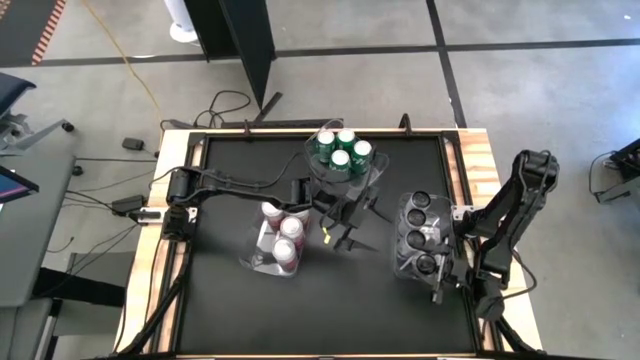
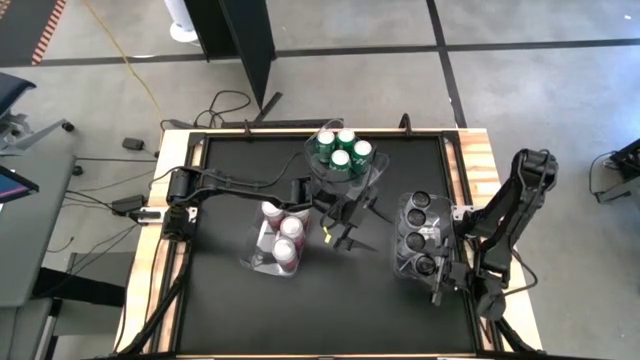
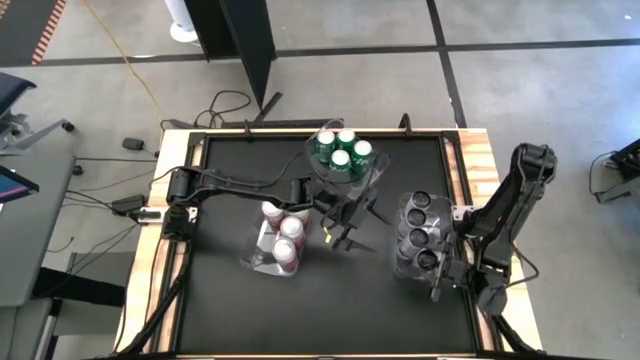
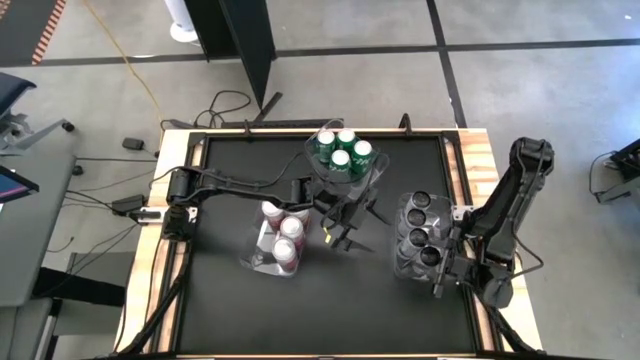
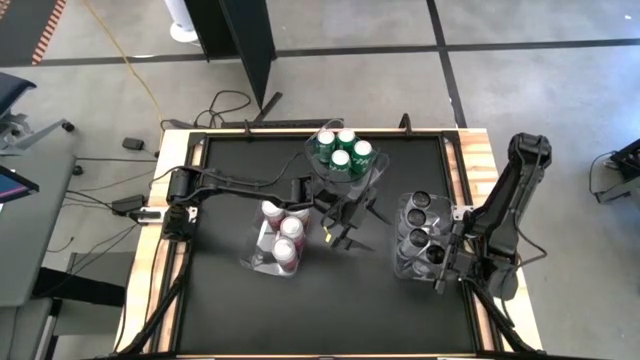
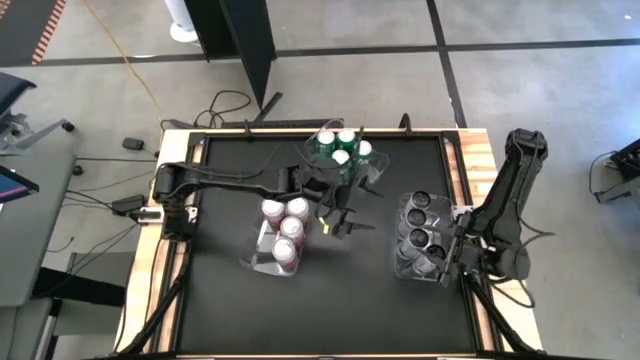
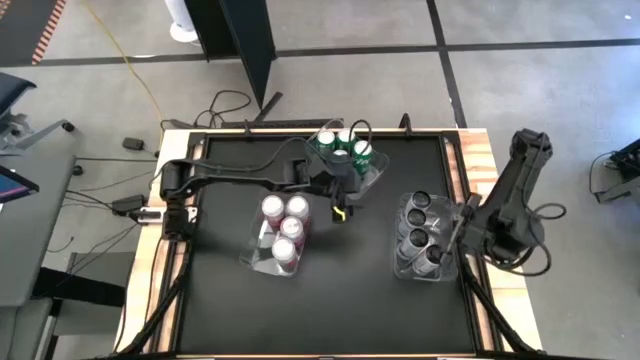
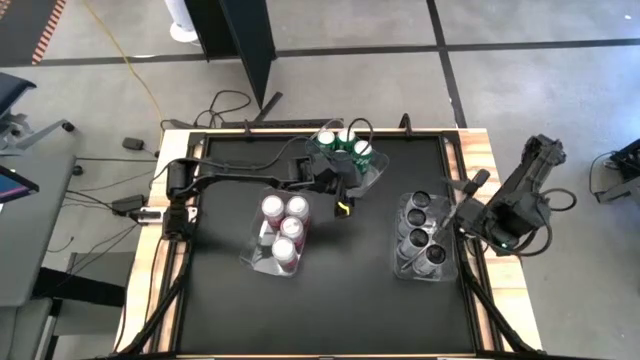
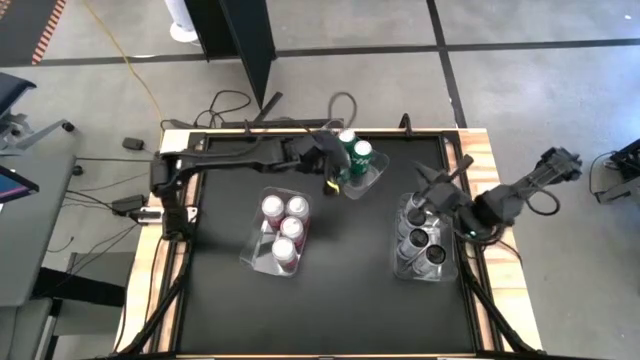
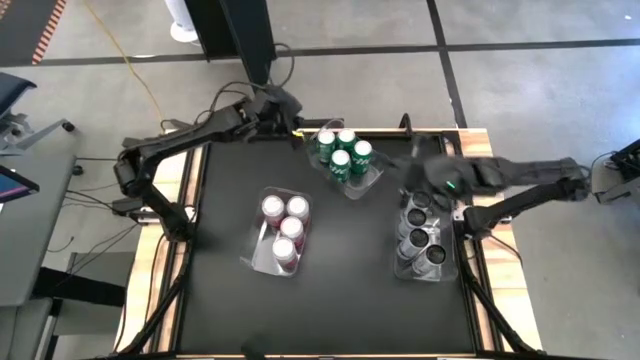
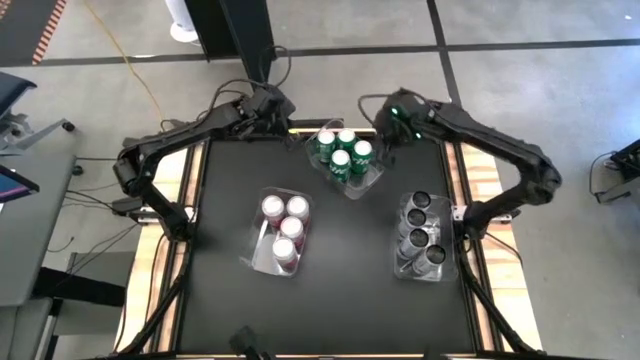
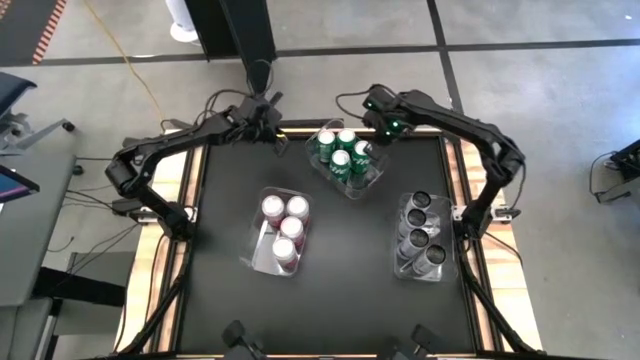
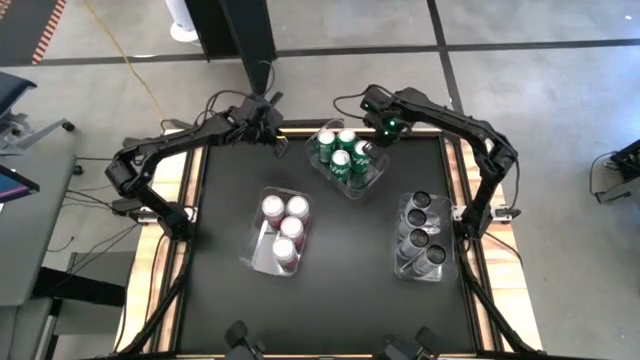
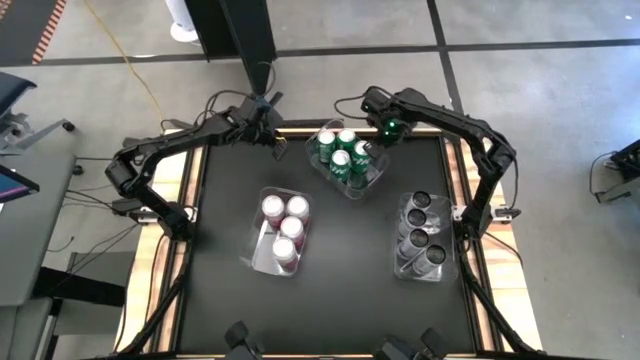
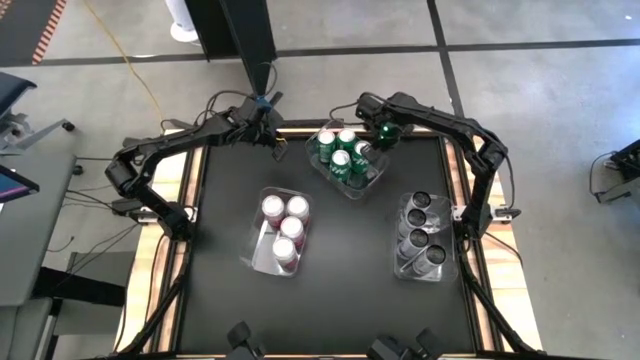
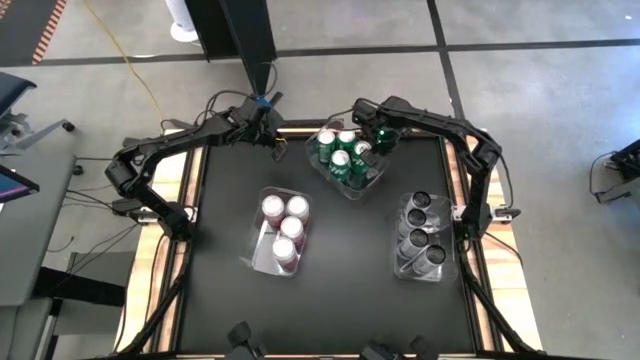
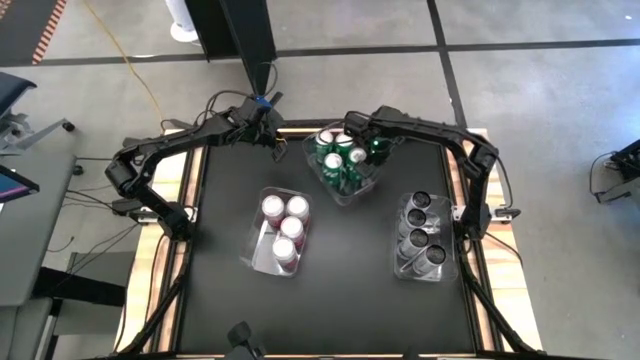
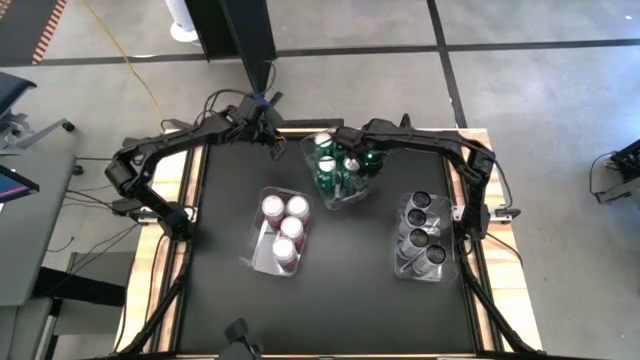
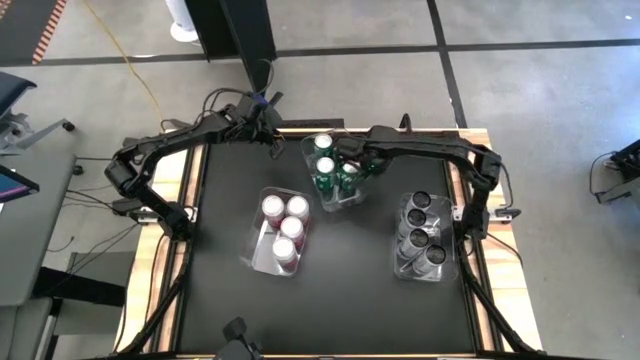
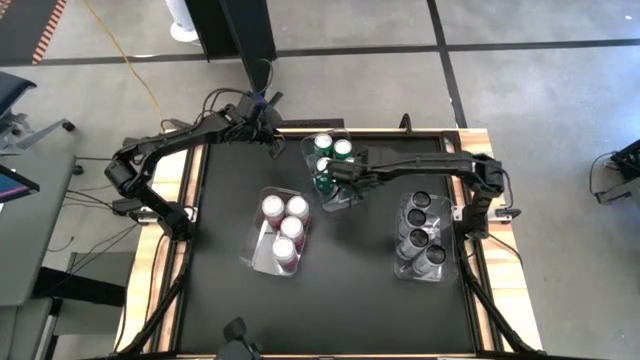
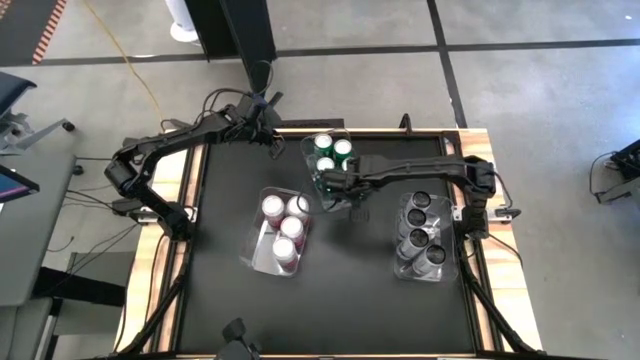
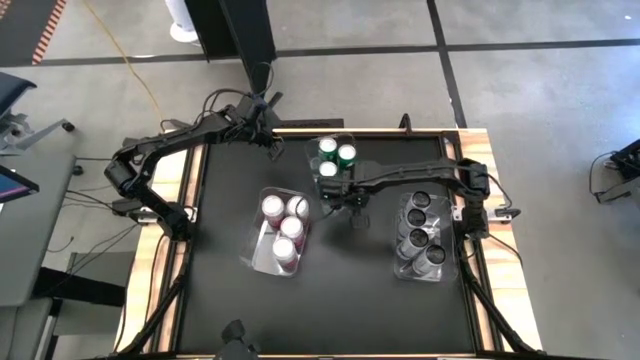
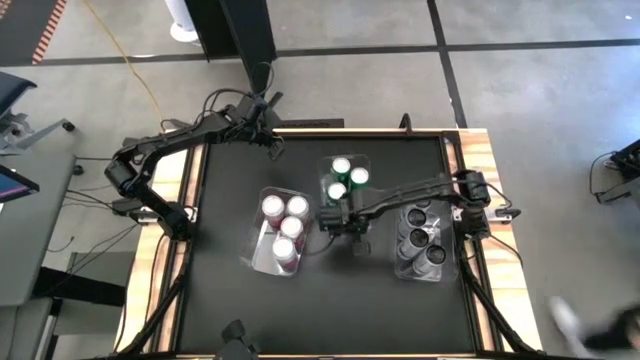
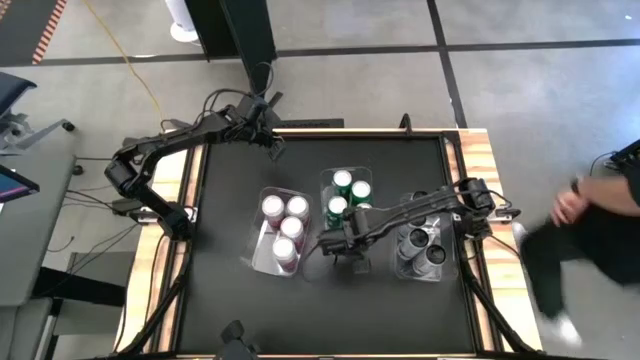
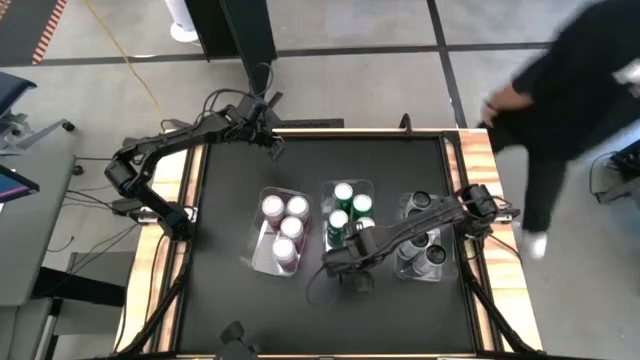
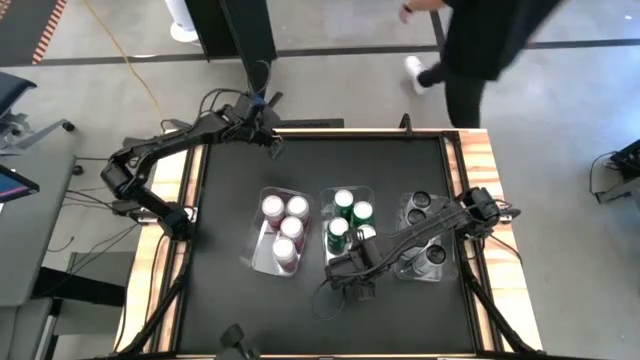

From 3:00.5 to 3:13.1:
Task: Sort soda cans
Move the middle transparent bin to the center of the table

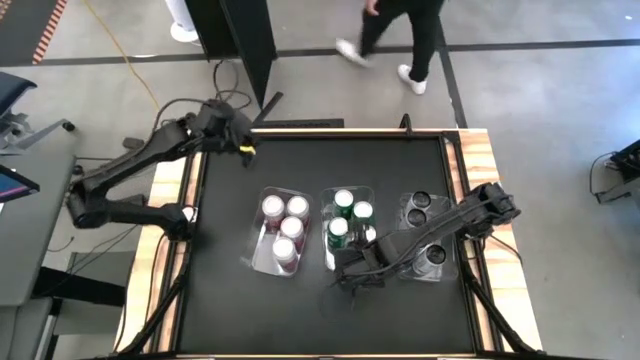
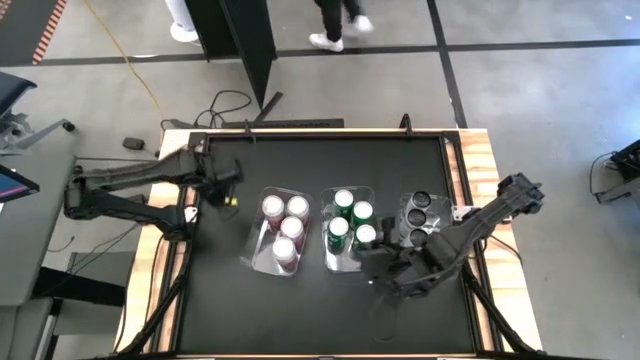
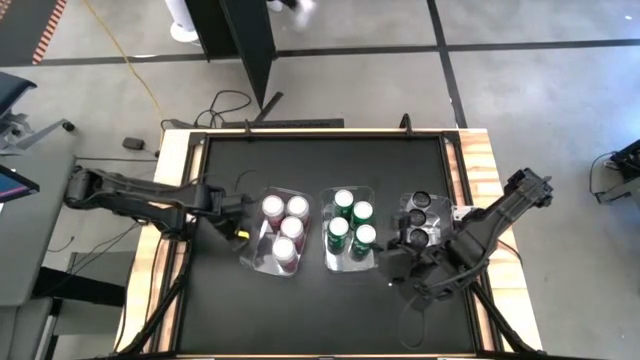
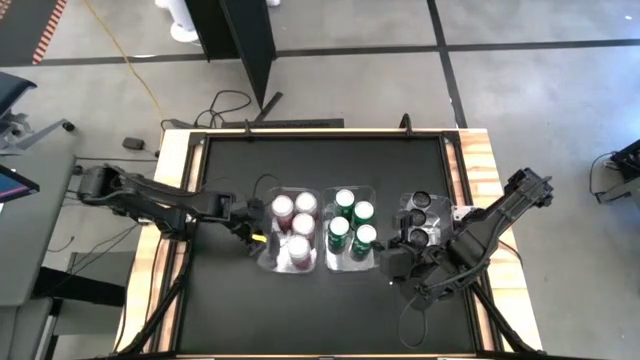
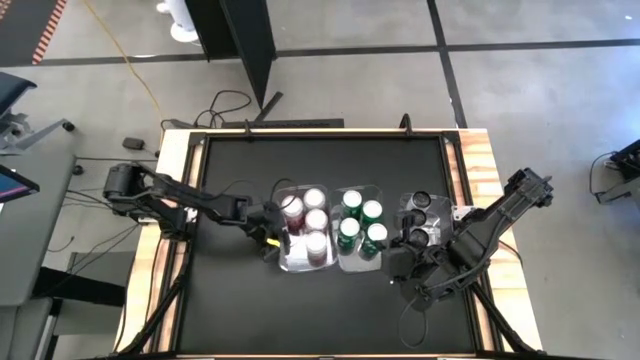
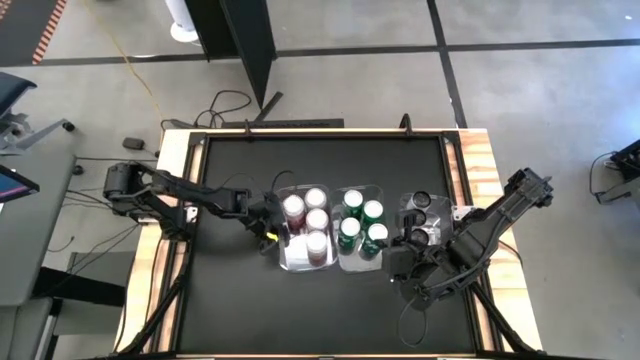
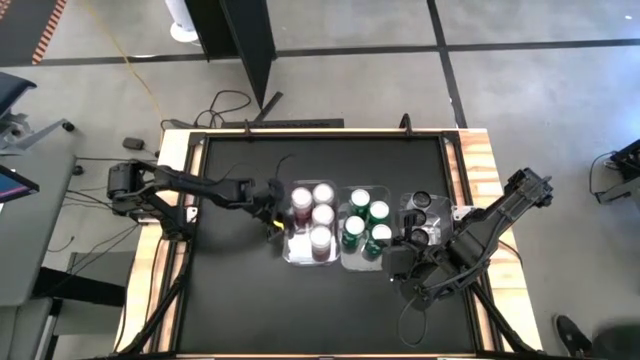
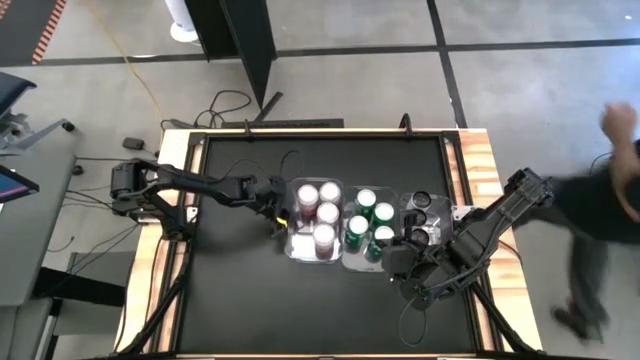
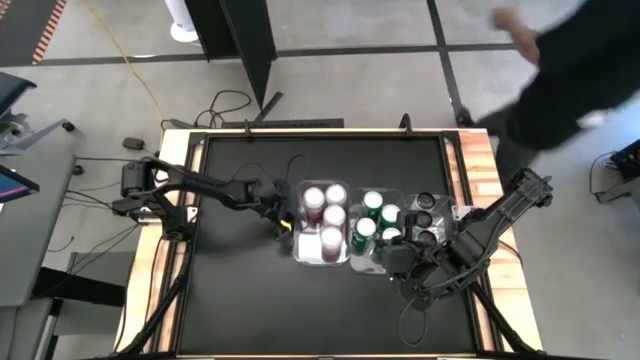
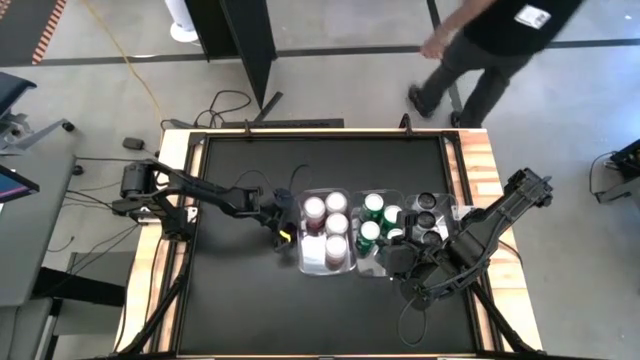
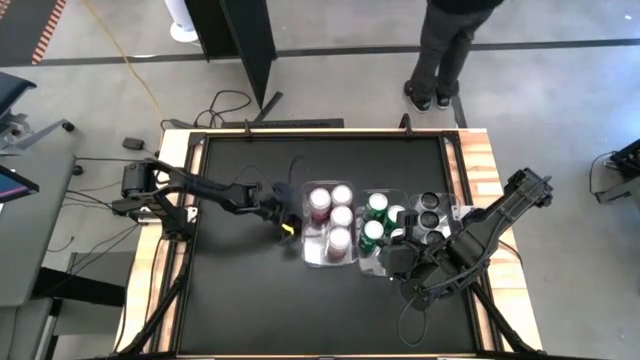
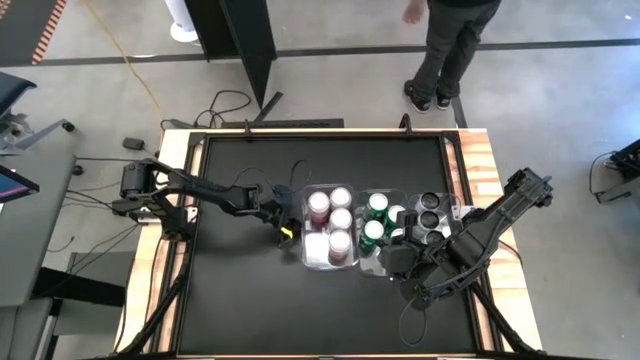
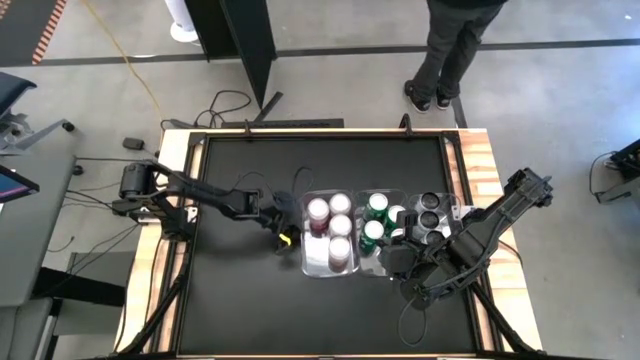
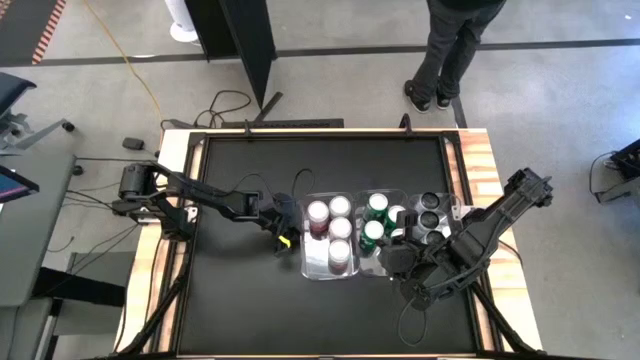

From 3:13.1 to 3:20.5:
Adjust the left transparent bin

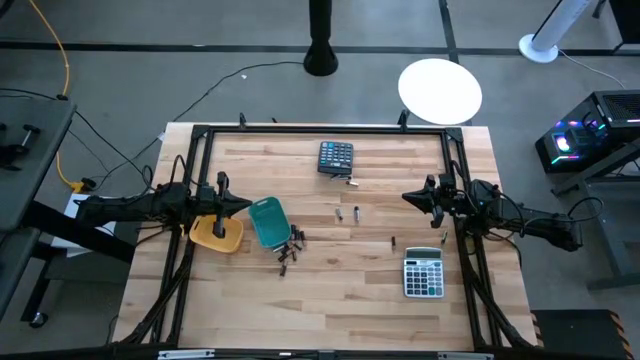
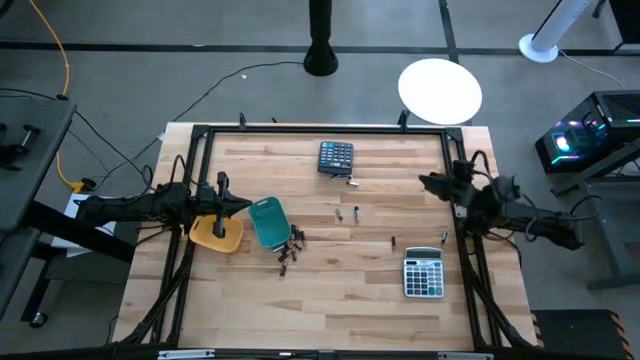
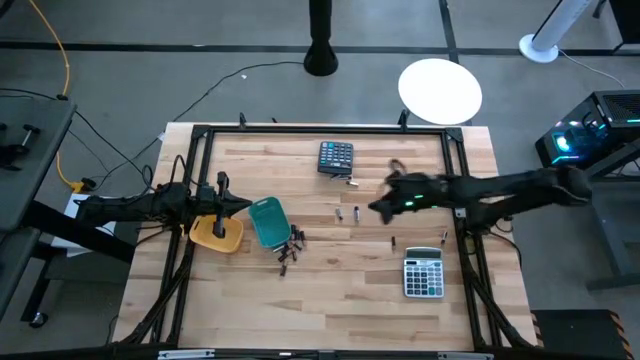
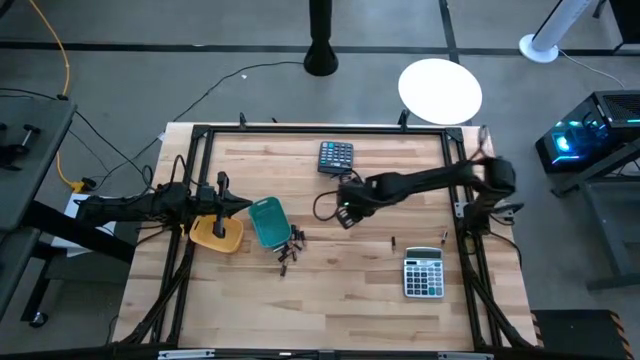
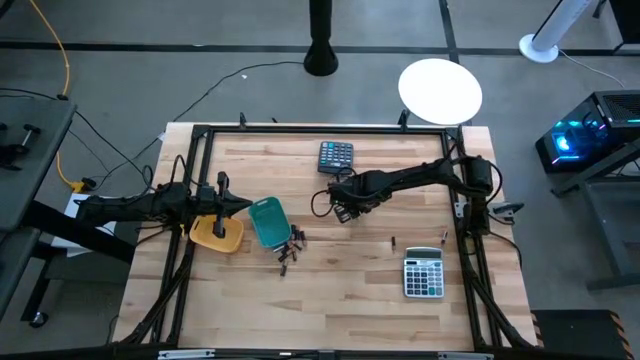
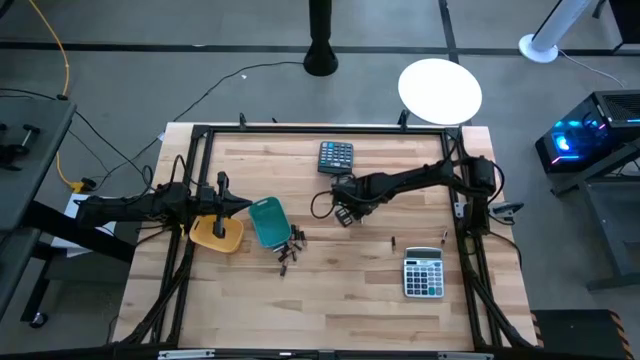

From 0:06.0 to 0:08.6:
Task: Sort batteries
Put the silver battery into the green bin
